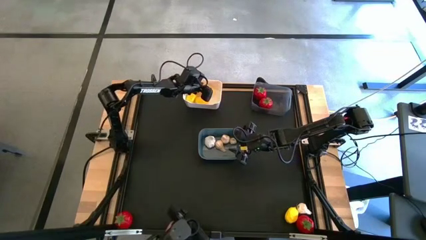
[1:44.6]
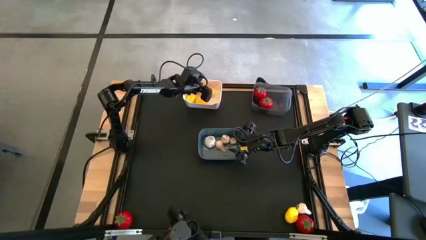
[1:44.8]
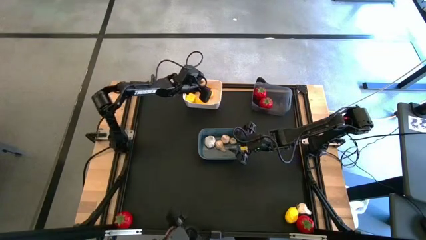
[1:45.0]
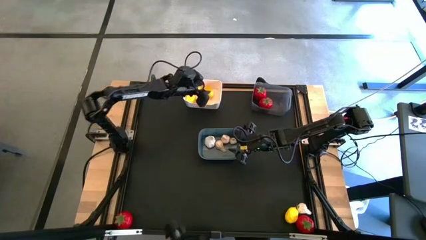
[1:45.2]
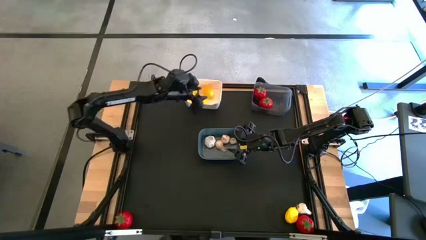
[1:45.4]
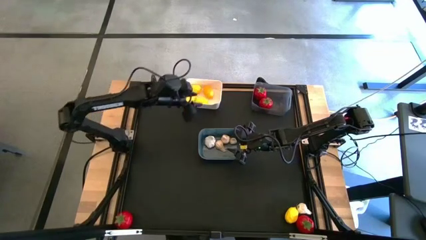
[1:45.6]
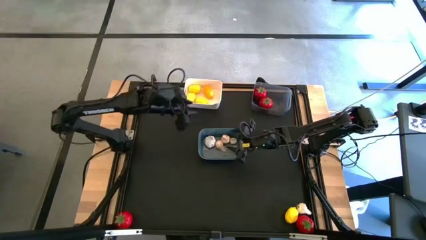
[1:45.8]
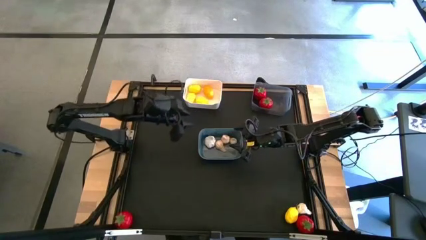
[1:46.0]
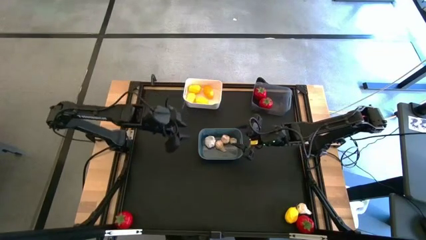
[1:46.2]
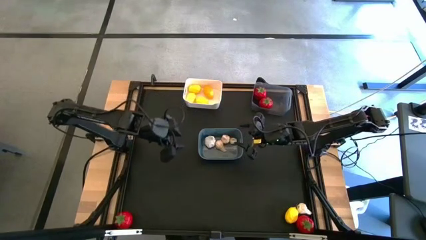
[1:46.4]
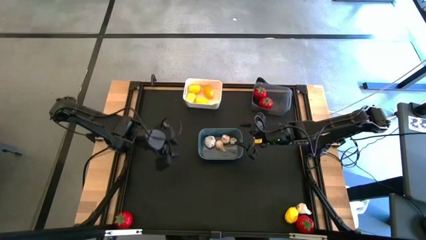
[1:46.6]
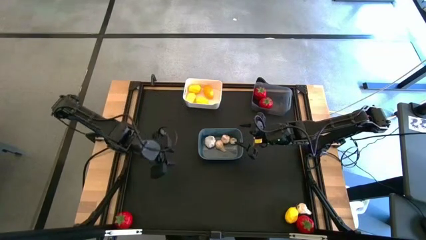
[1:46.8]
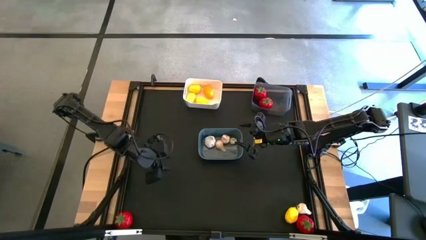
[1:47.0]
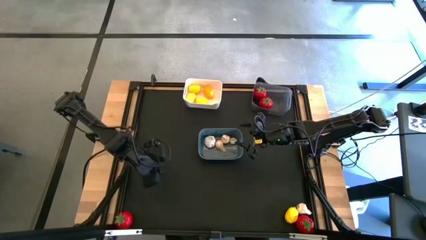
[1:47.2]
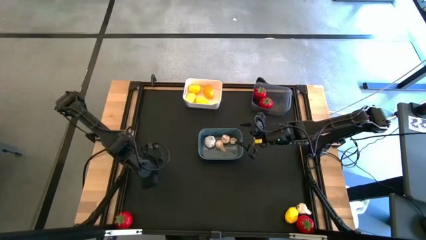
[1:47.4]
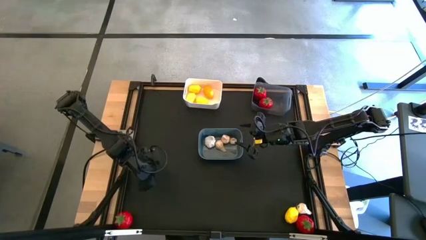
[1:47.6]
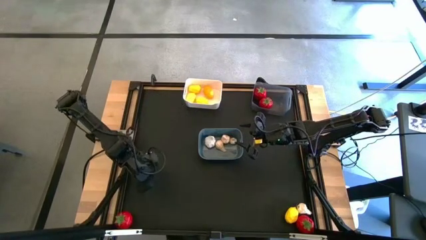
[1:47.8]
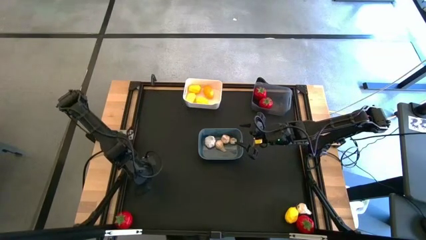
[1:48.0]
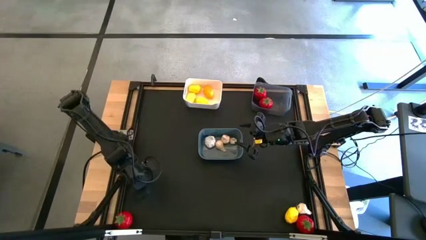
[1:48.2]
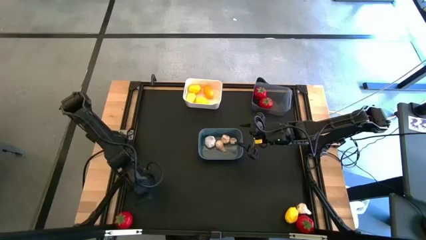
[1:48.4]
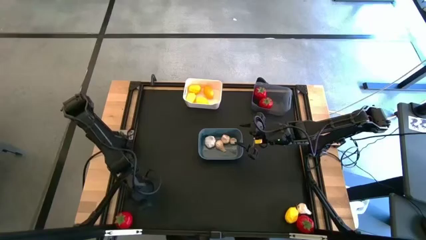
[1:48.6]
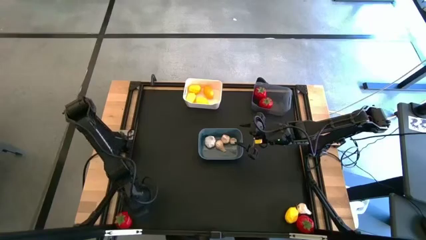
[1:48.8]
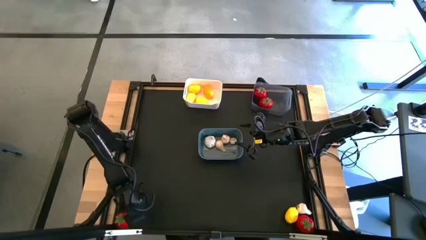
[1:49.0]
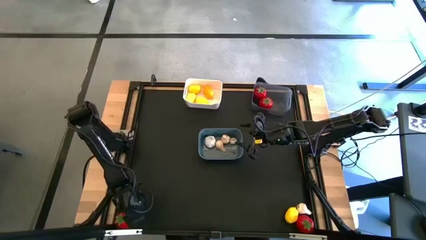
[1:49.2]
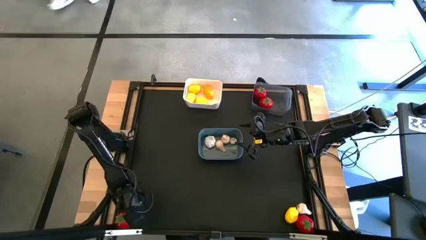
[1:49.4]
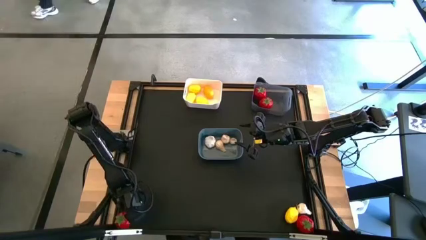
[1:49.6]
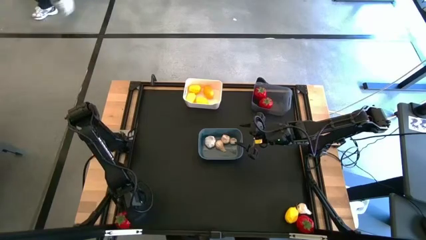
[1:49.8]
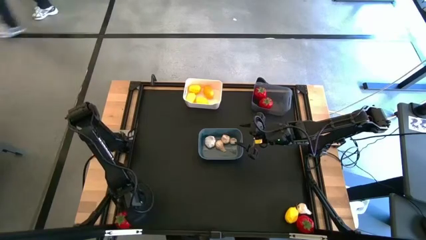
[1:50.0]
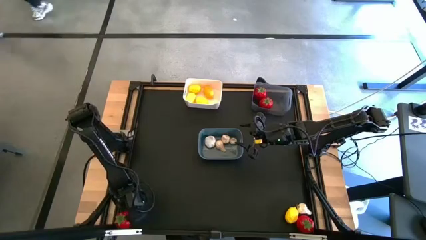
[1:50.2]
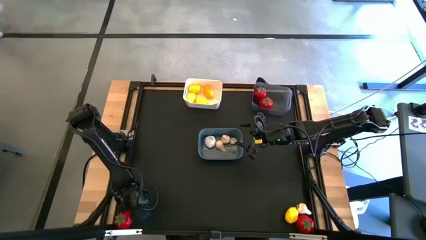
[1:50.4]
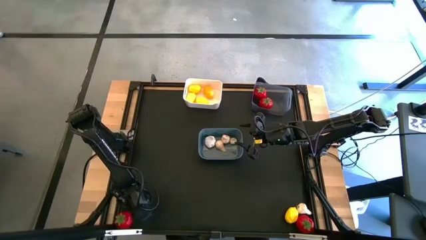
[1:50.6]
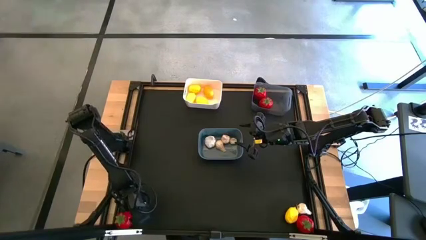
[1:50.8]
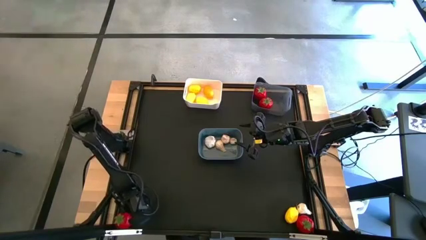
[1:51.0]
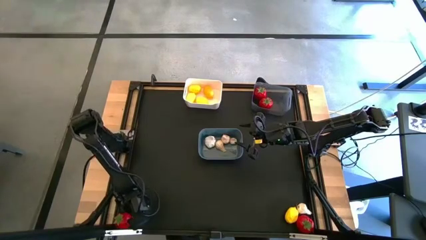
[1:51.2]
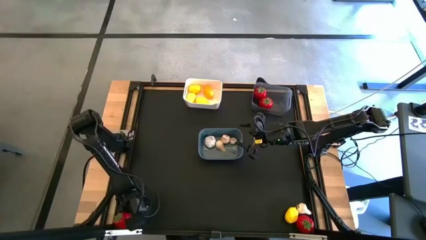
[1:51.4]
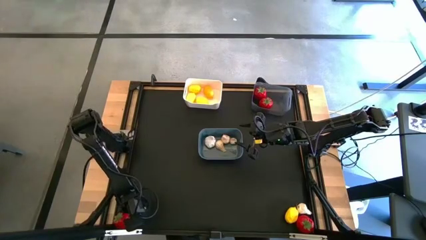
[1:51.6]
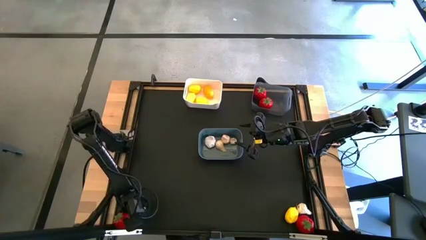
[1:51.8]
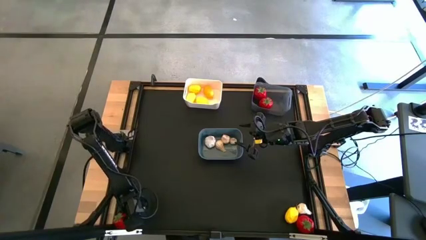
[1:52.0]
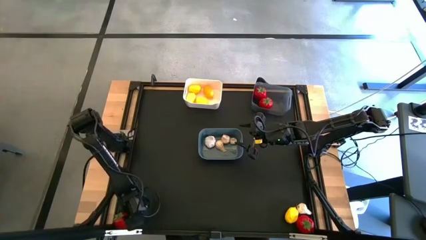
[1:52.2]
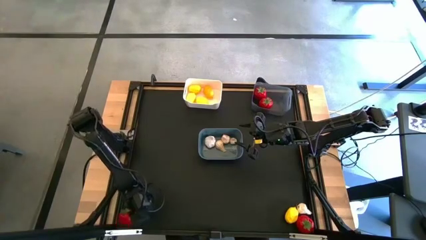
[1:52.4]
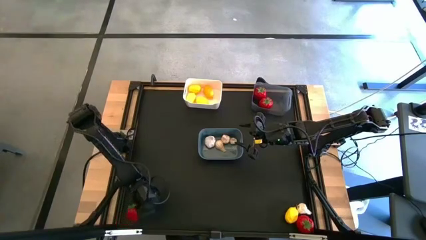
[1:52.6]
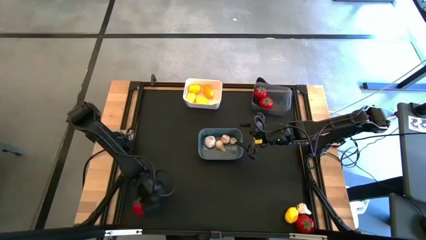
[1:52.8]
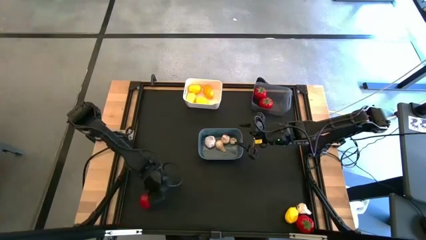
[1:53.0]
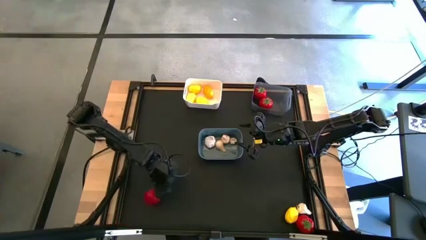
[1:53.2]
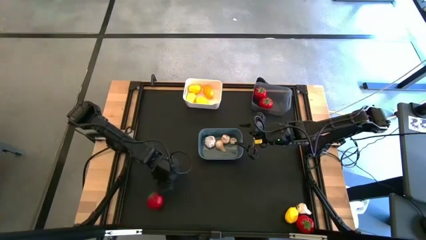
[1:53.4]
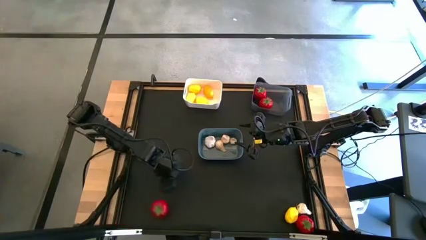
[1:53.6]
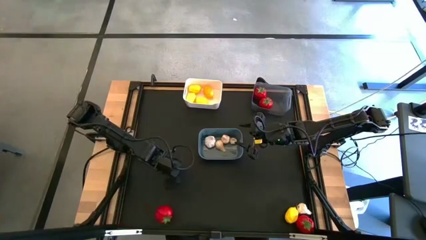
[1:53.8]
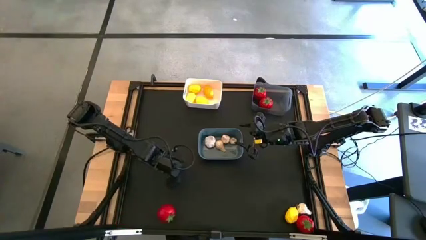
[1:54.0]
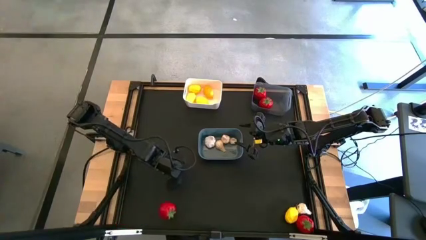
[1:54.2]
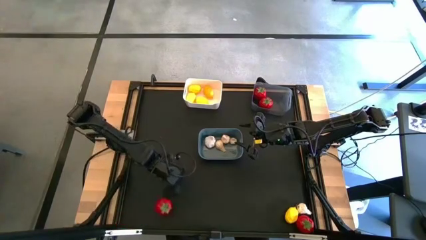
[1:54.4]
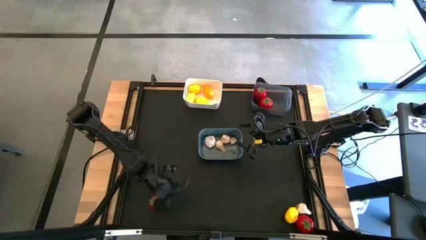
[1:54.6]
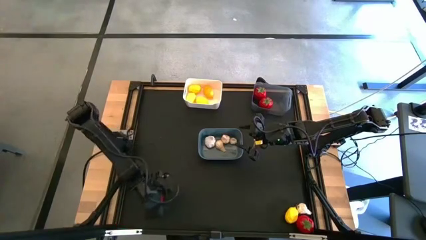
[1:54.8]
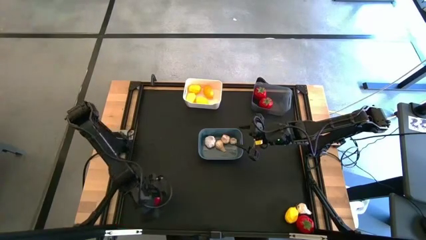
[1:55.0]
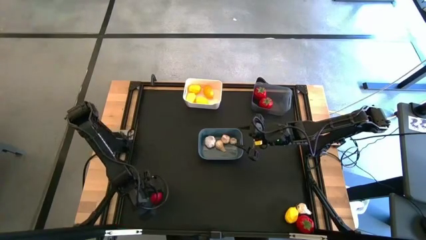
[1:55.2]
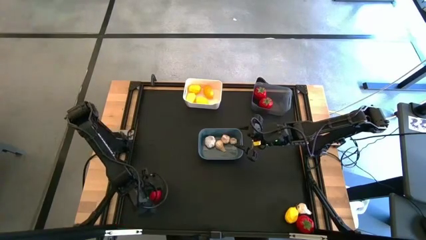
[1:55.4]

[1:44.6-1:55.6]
Task: Sort produce into baskets
Put the red tomato into the black bin

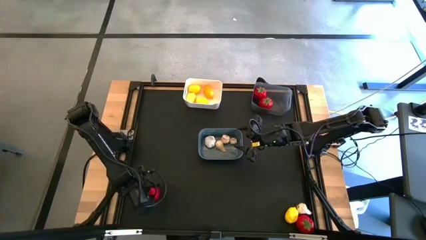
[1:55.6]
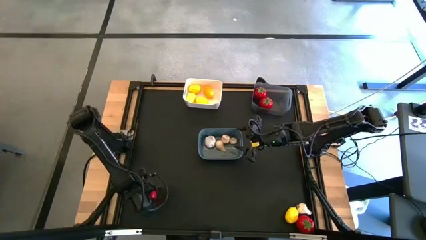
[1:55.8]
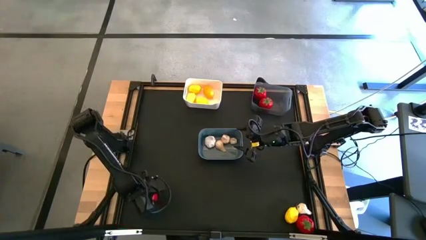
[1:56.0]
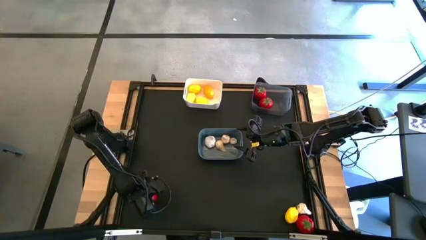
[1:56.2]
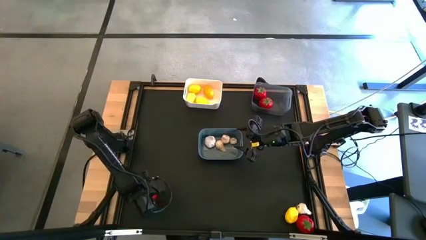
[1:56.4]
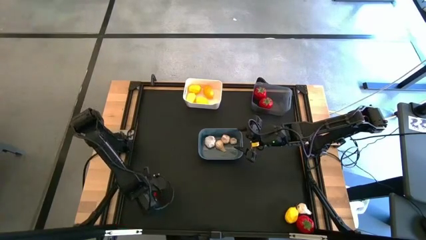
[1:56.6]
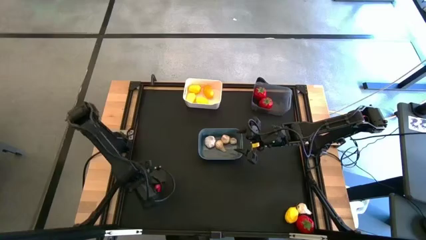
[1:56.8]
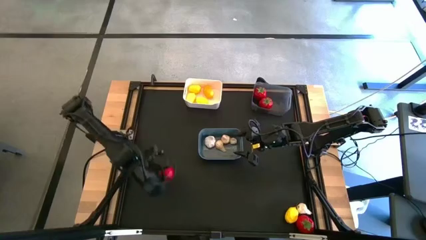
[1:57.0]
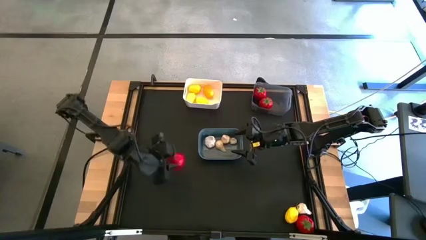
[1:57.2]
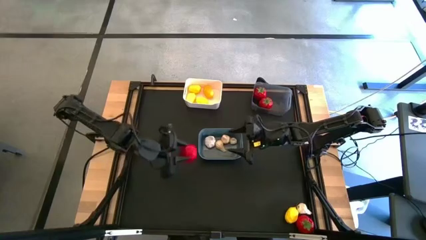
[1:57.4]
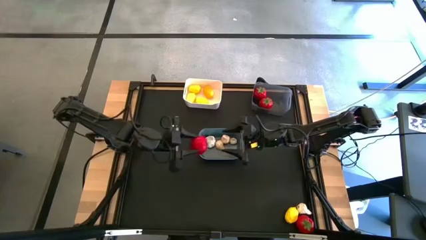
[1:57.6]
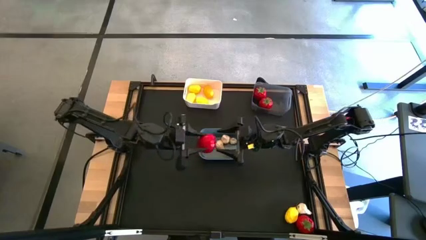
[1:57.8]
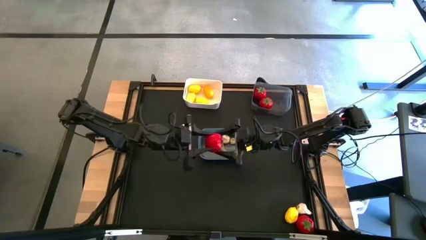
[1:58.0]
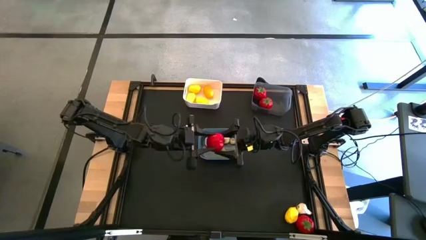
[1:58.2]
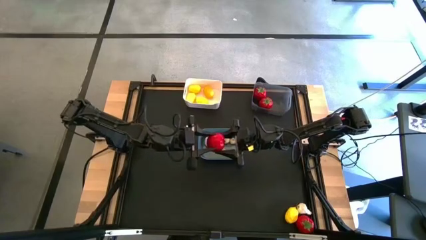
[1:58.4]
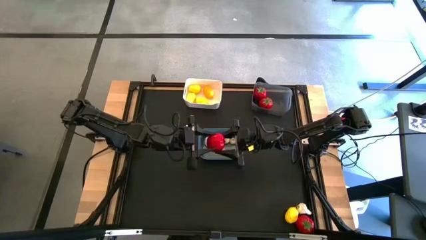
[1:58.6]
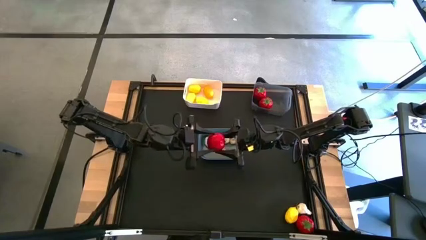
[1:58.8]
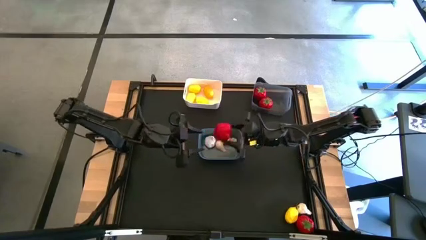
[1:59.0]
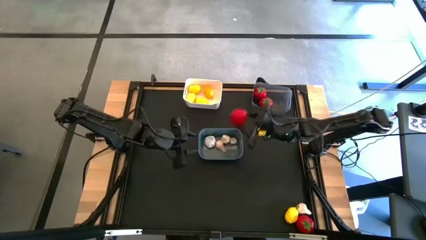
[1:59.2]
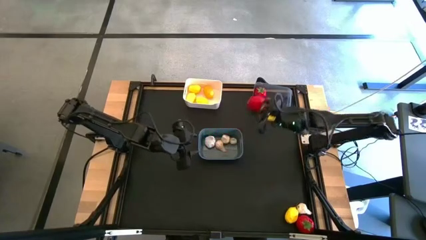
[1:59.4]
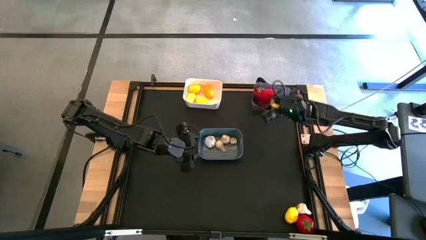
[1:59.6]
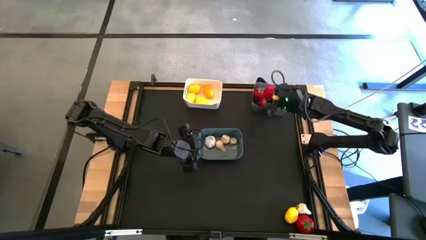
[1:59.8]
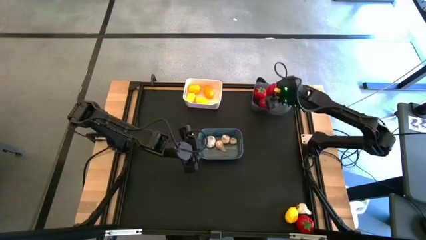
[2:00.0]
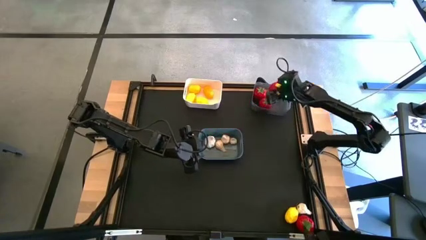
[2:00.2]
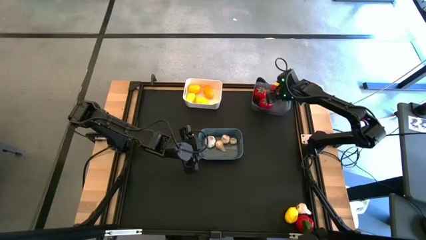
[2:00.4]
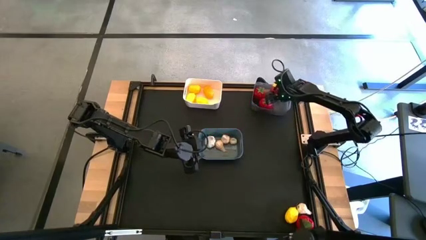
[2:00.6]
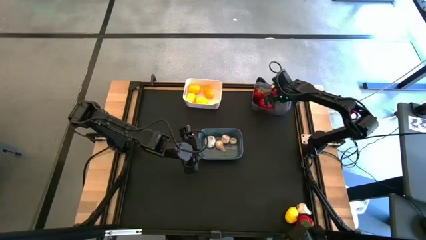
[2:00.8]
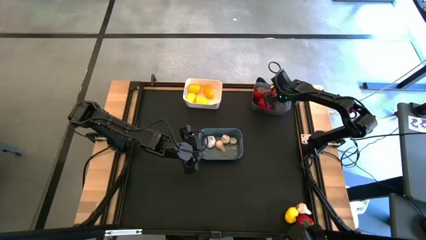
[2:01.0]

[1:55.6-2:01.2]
Put the red tomato into the black bin
